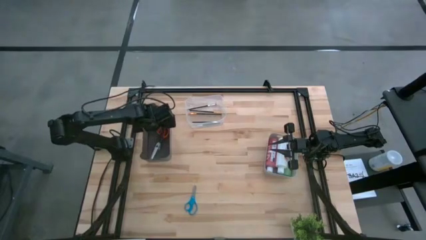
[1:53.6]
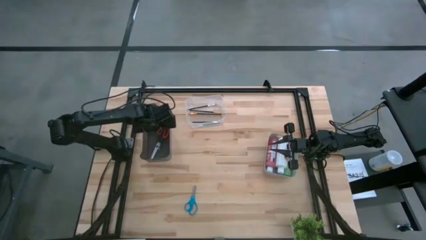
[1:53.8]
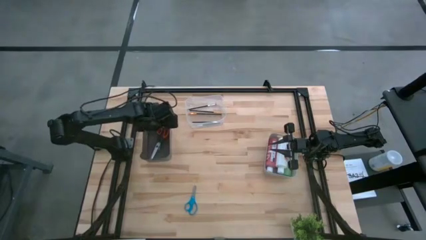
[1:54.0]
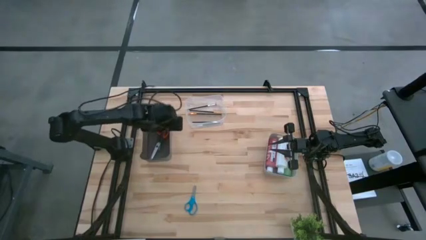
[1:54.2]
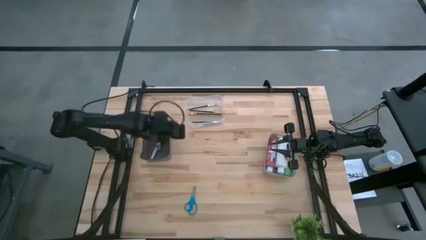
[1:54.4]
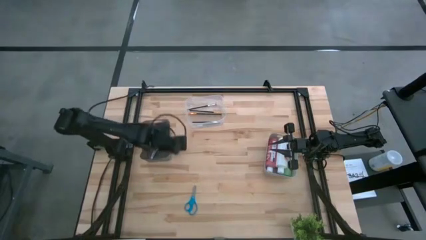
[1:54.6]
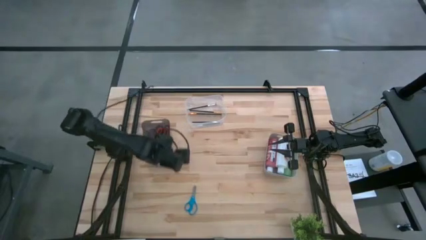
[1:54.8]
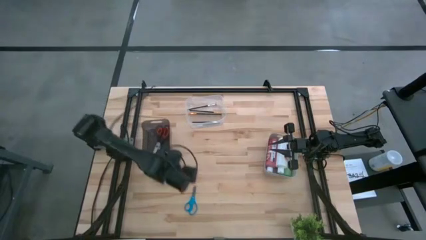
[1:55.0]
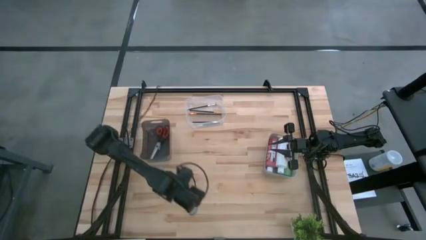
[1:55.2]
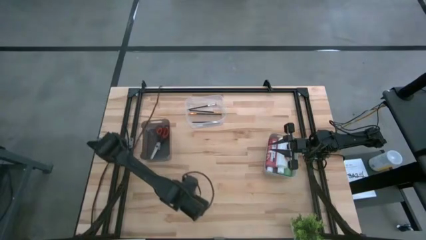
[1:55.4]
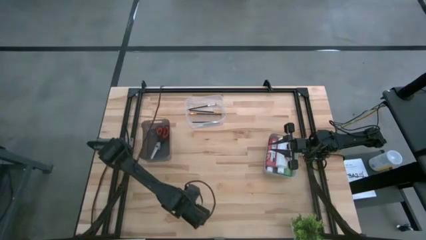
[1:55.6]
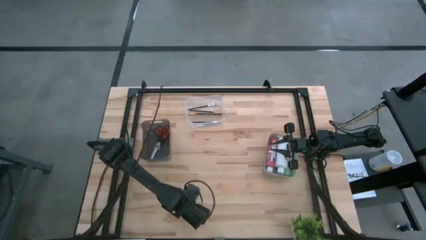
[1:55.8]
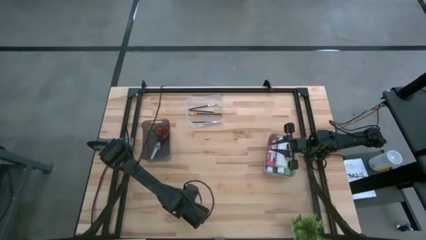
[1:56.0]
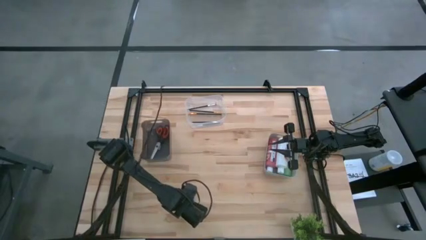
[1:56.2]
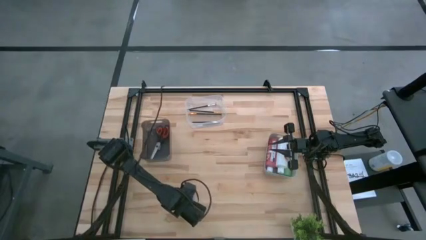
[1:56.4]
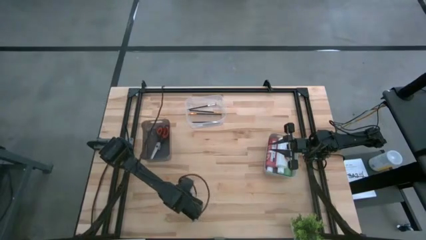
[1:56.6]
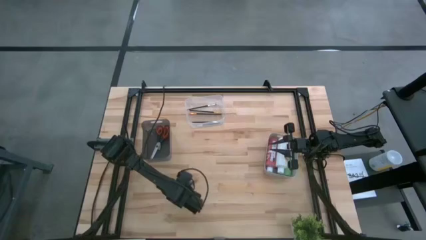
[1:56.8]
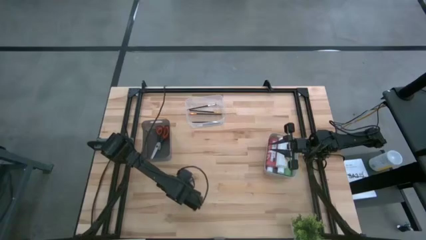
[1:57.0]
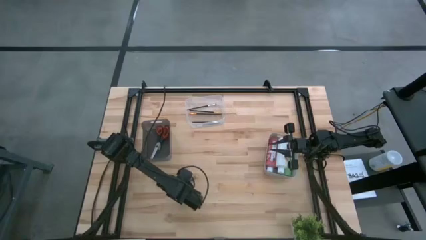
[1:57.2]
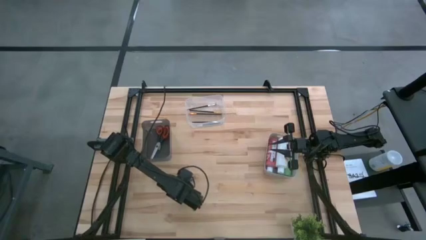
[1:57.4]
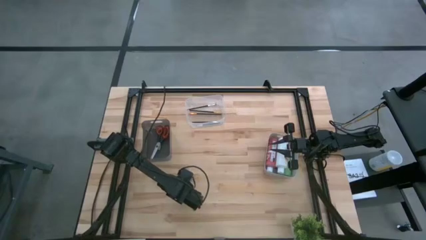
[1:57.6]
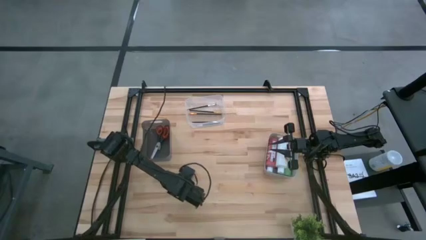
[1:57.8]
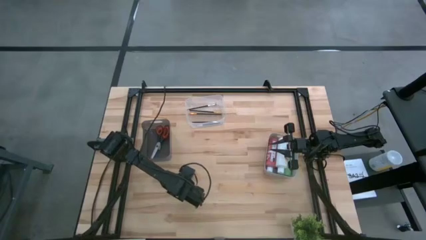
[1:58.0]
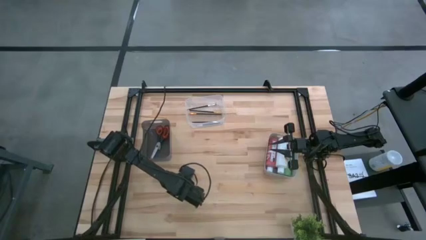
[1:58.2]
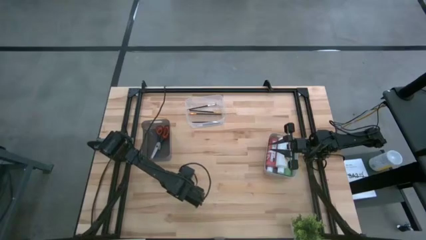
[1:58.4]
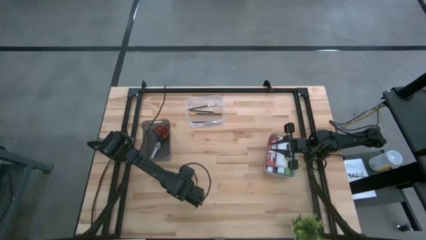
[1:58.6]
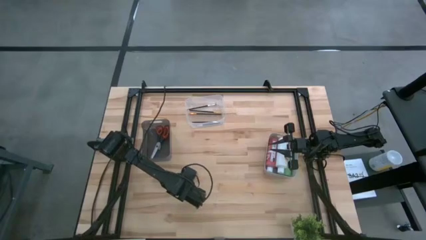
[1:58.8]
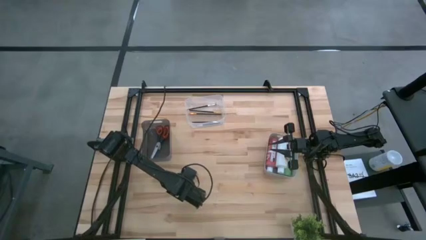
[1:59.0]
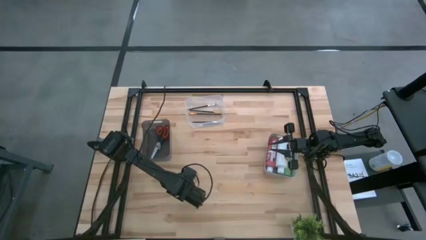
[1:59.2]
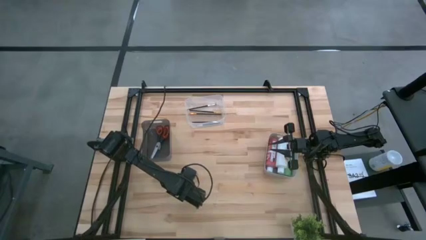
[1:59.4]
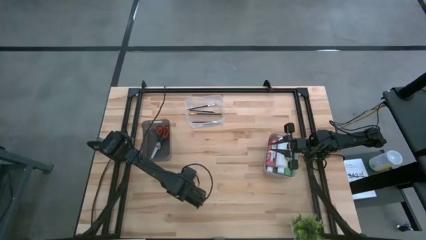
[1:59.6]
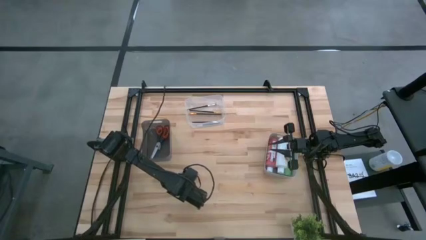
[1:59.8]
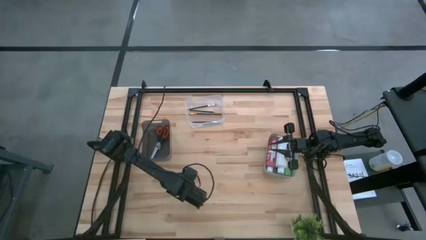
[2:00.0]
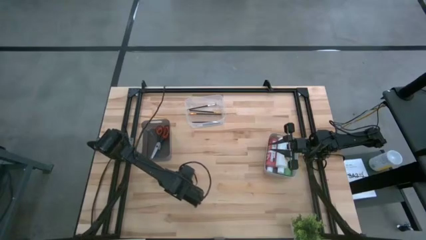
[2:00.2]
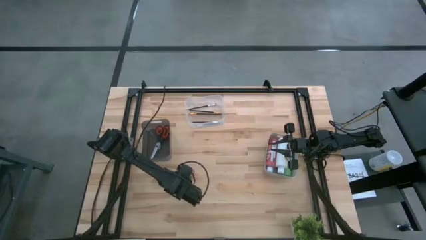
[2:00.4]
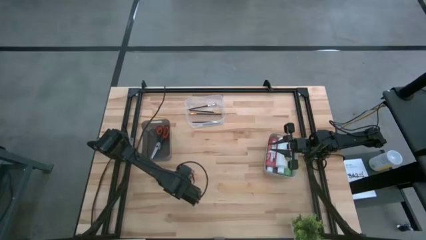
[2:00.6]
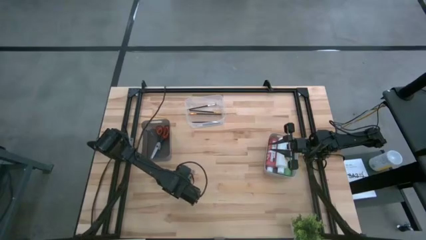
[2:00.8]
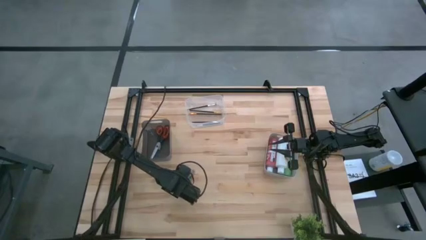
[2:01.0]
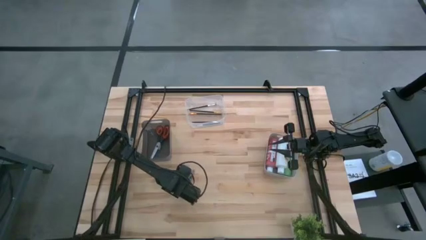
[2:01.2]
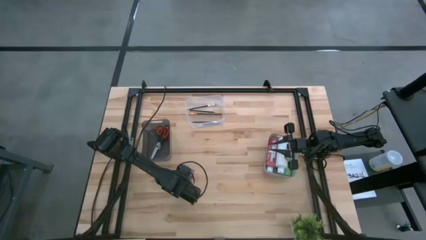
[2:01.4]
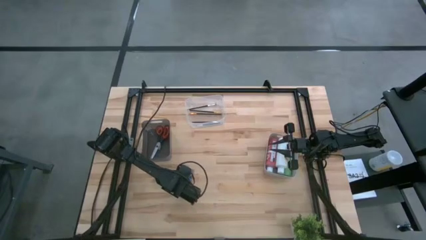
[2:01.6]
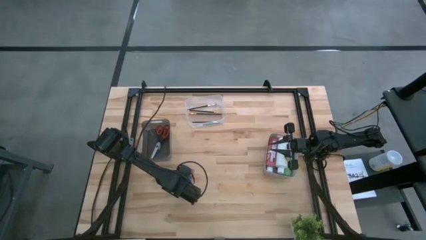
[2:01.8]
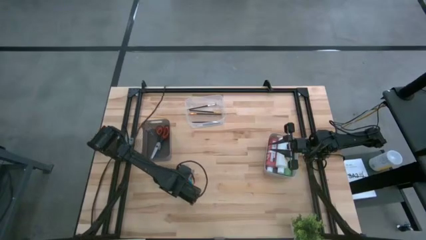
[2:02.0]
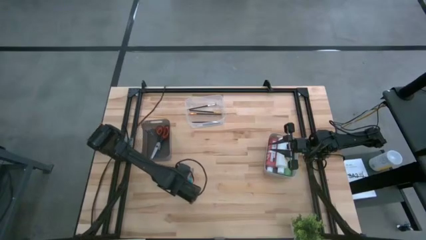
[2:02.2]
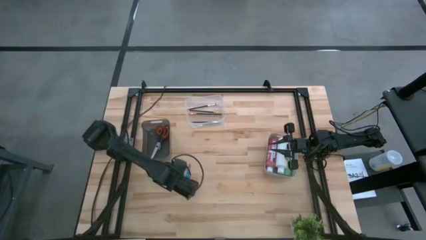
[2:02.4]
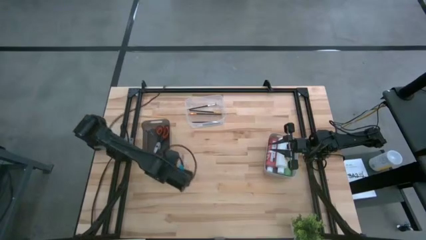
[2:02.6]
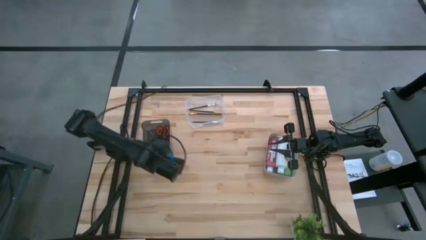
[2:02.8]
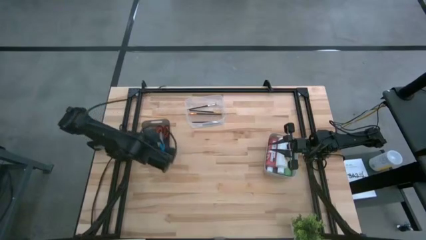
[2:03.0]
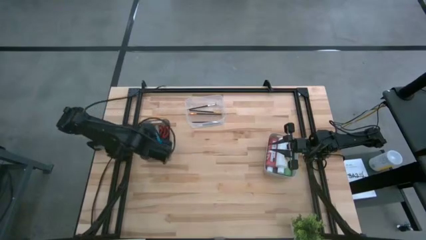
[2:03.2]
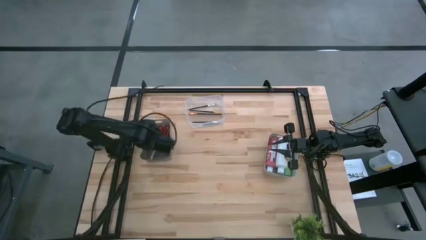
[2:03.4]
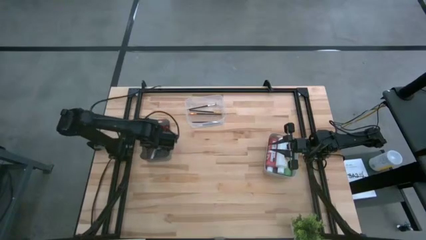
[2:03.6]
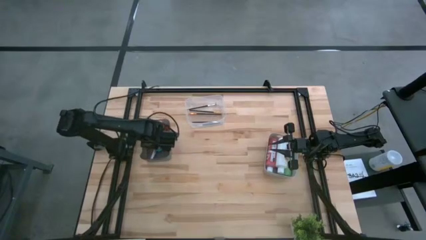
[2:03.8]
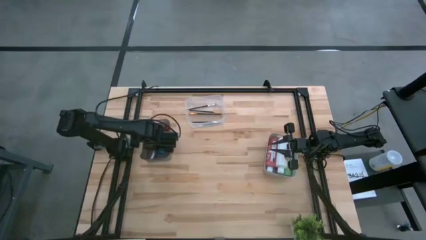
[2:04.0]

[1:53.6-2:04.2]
Task: Pick & Place Paint Supplies
Put the blue scissors into the black bin

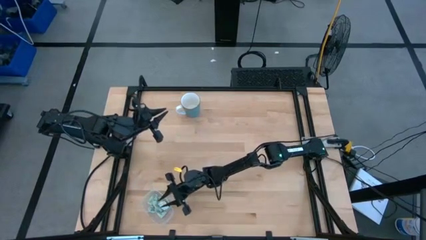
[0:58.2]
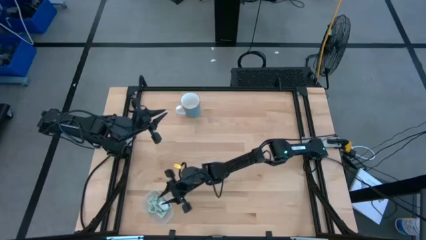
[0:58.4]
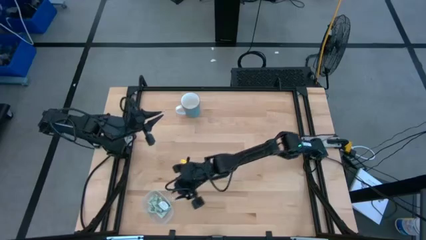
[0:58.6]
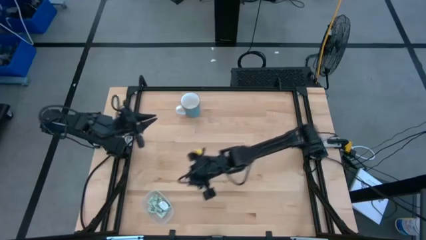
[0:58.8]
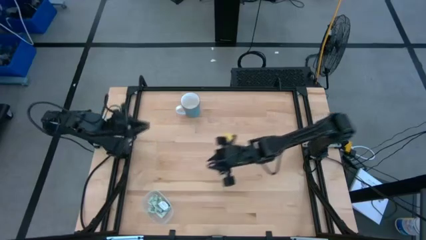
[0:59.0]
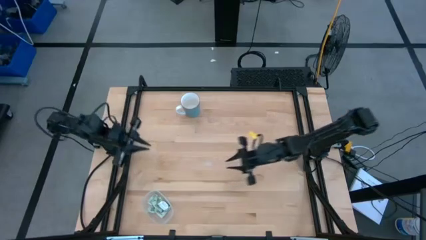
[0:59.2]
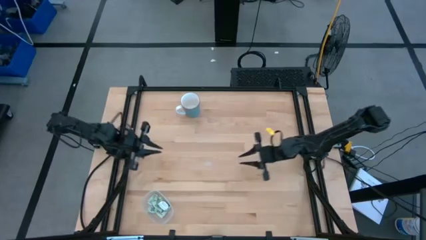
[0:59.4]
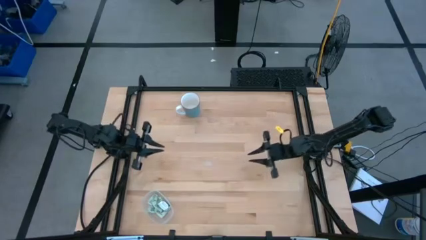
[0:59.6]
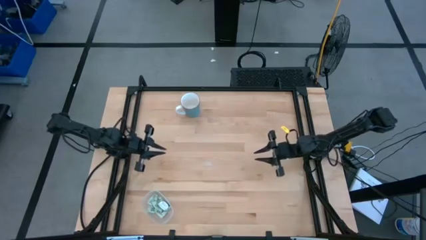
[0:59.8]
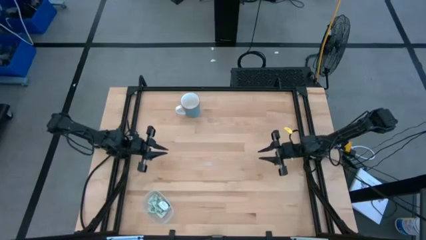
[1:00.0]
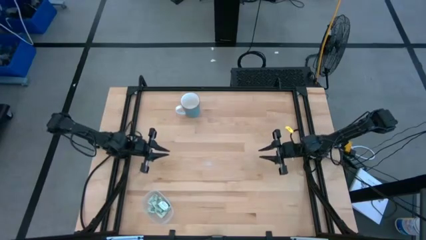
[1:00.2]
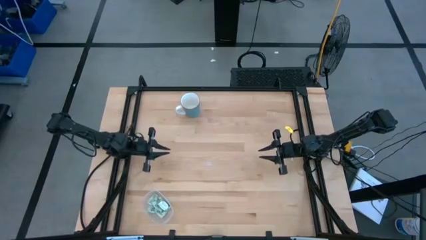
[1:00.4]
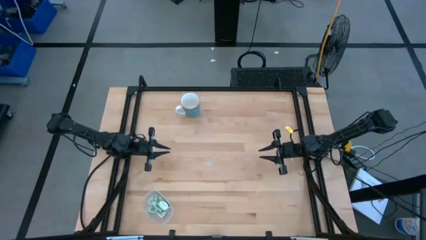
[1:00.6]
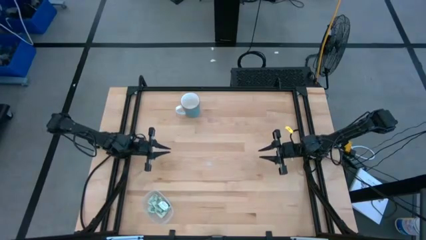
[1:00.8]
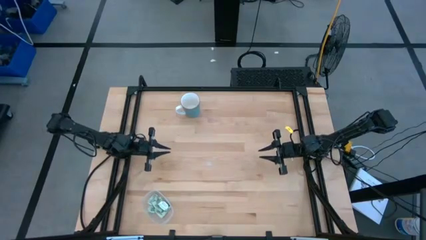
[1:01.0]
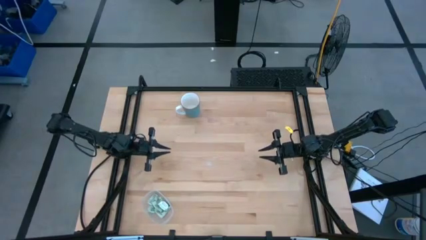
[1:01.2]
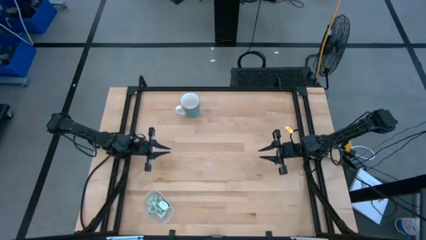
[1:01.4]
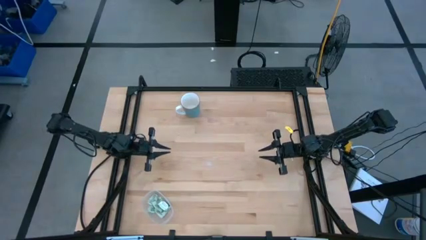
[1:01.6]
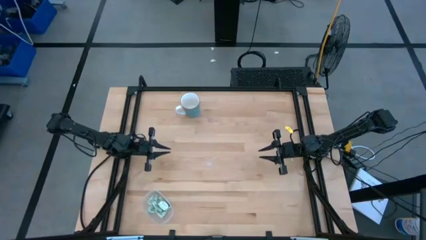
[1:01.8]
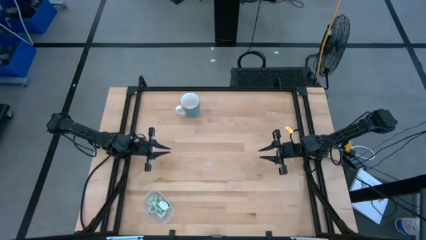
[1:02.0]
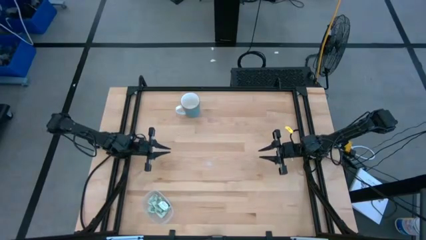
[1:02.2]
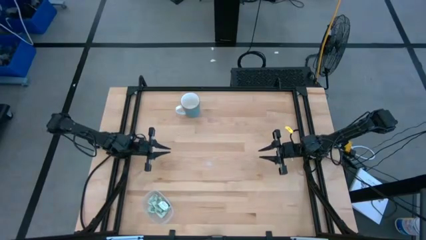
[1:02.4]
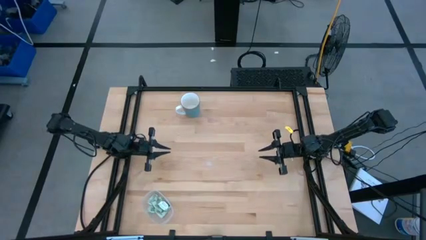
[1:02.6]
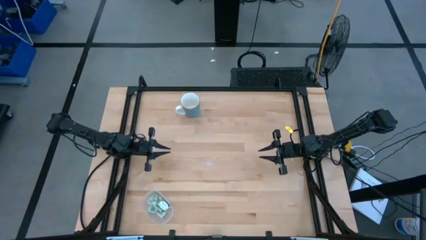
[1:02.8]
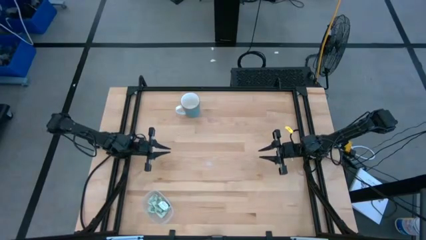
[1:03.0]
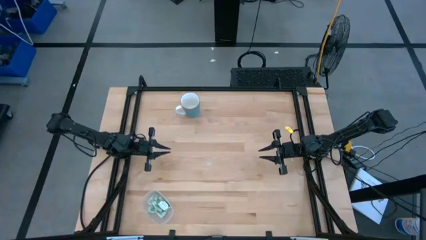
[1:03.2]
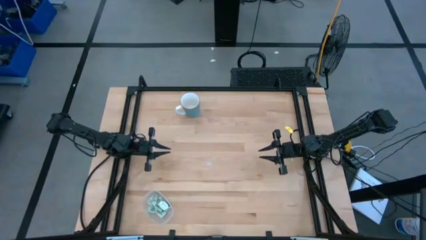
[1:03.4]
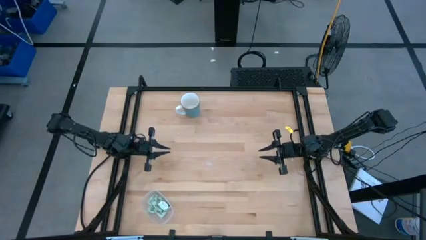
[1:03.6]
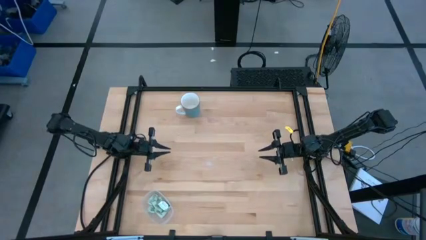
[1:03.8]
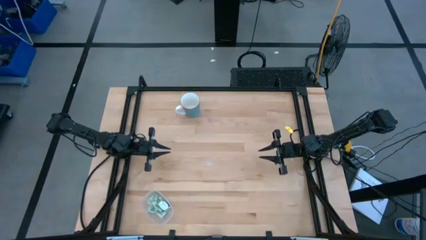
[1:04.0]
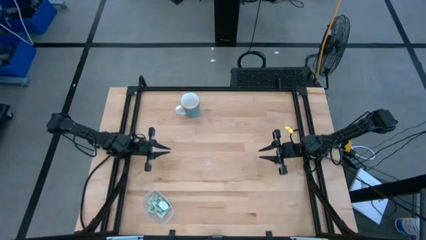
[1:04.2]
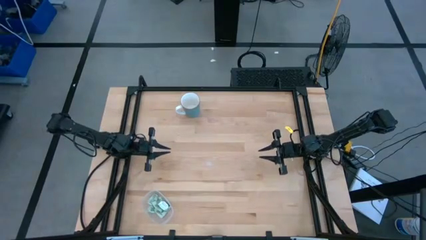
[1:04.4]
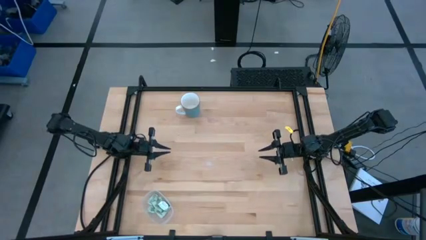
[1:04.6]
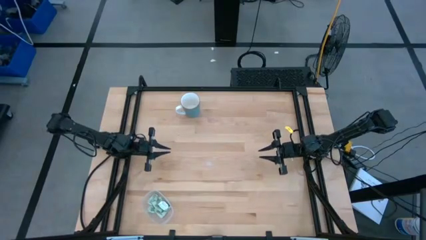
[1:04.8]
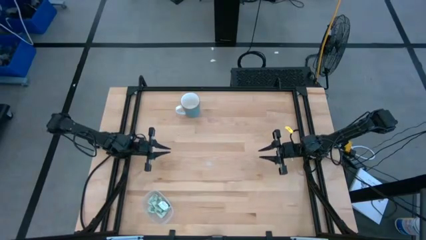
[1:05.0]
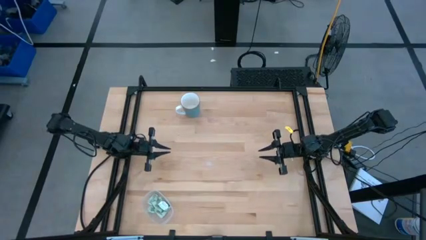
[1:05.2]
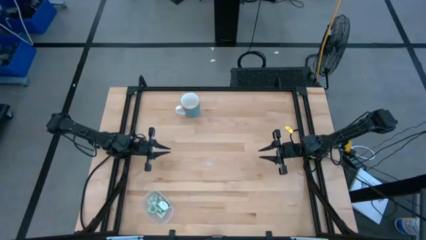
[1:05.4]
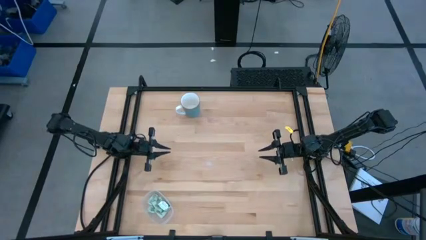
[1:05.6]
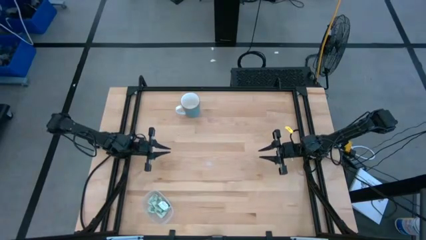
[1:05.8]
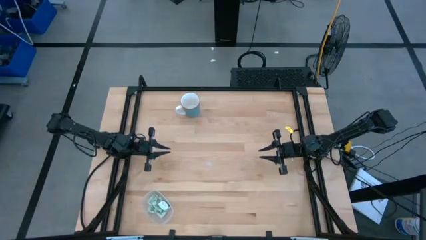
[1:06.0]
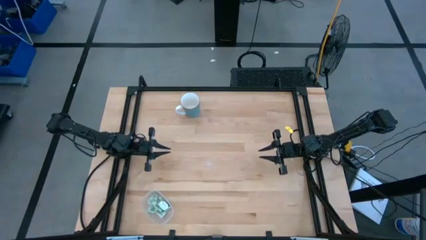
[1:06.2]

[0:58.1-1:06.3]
Task: Pick and place Stevia / Truvia into bins
Return to Home Position
